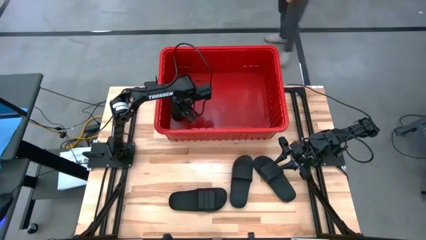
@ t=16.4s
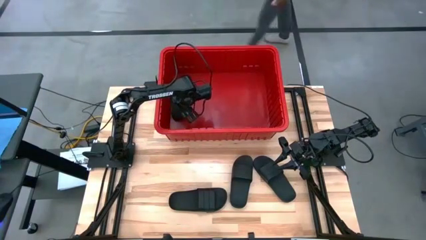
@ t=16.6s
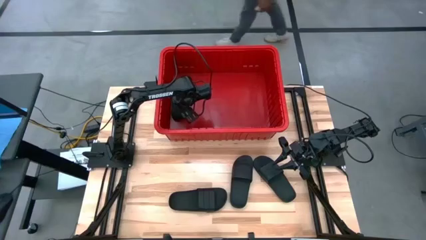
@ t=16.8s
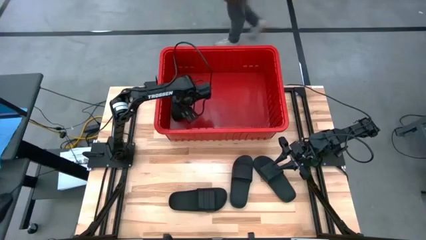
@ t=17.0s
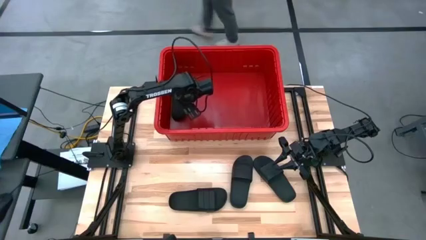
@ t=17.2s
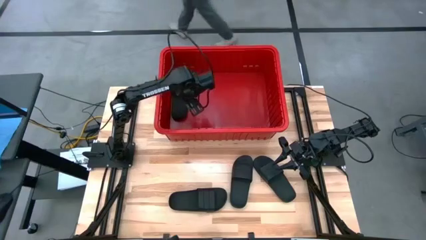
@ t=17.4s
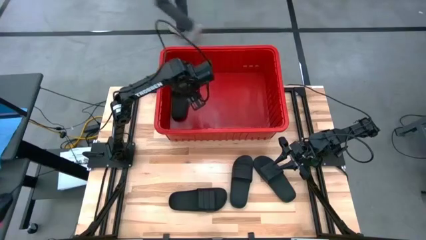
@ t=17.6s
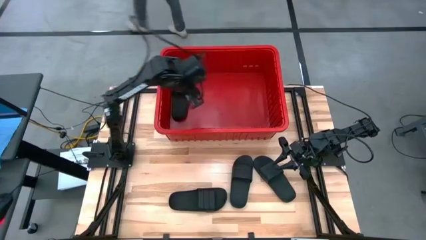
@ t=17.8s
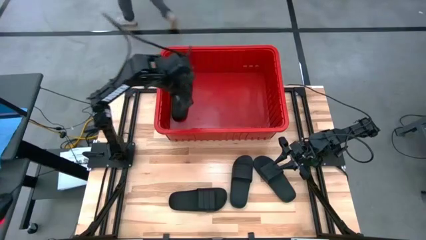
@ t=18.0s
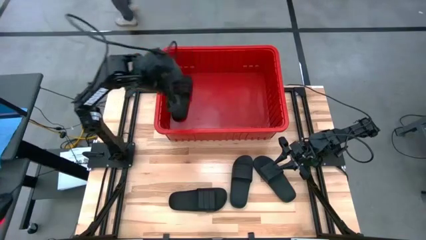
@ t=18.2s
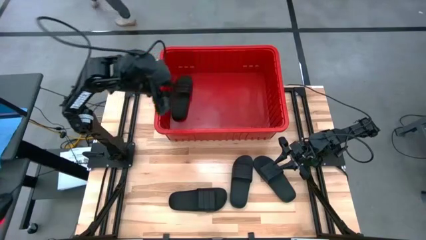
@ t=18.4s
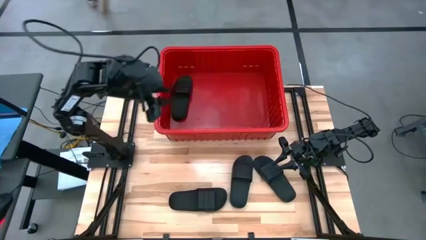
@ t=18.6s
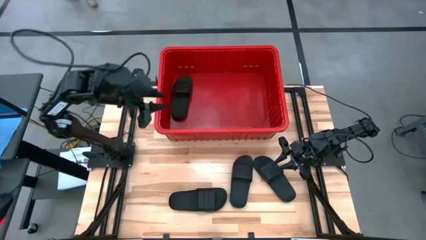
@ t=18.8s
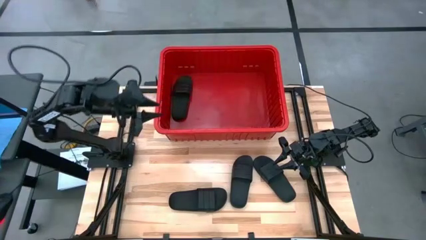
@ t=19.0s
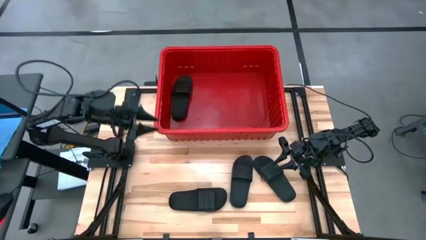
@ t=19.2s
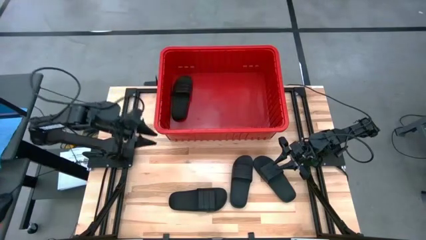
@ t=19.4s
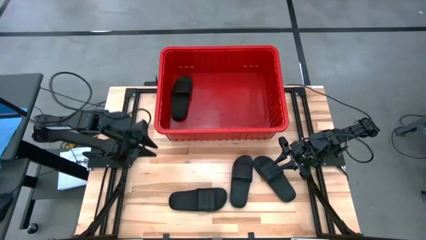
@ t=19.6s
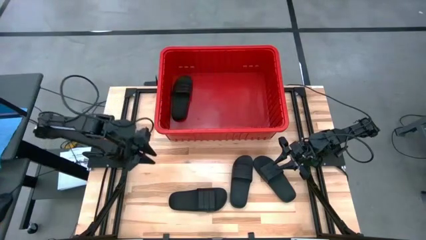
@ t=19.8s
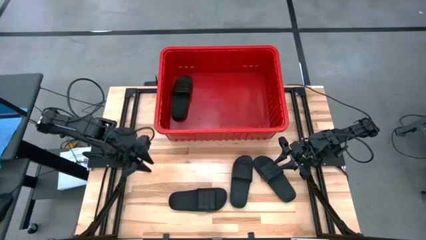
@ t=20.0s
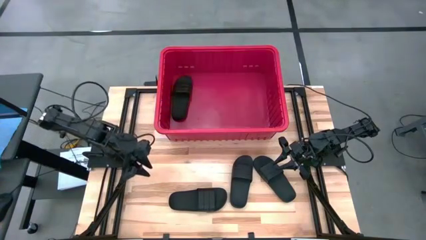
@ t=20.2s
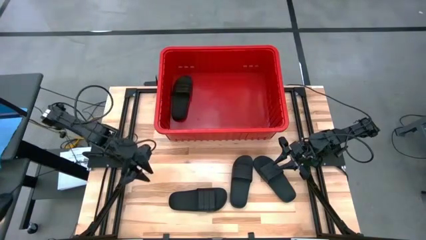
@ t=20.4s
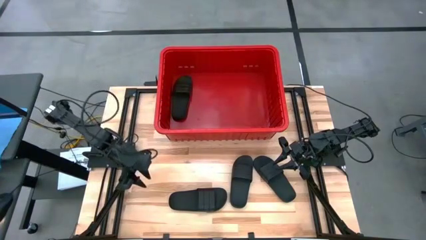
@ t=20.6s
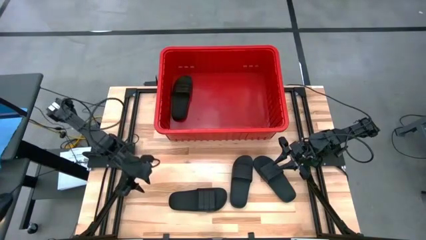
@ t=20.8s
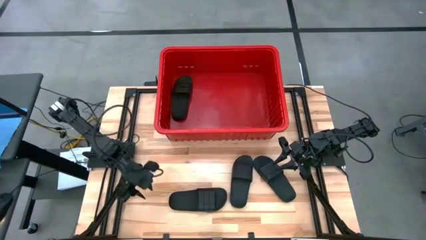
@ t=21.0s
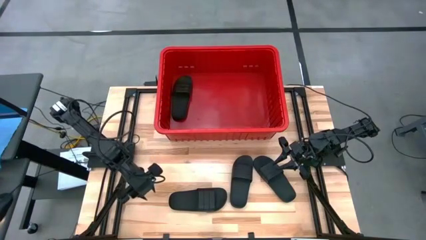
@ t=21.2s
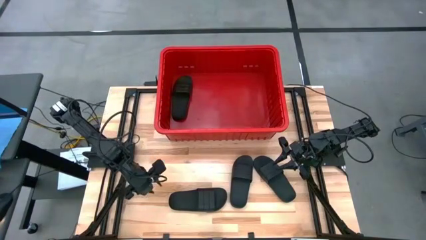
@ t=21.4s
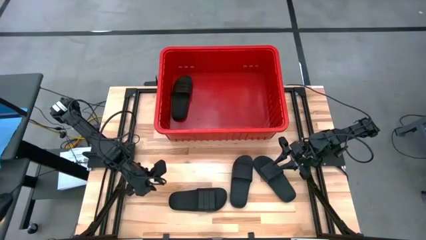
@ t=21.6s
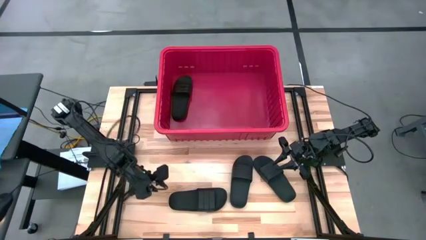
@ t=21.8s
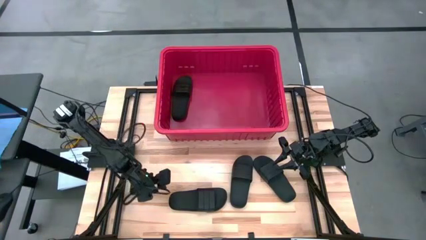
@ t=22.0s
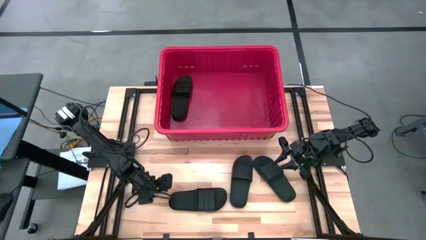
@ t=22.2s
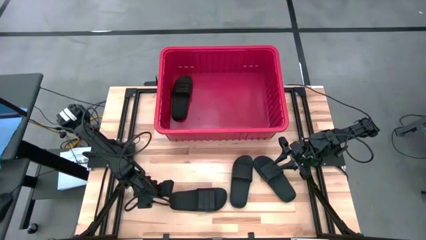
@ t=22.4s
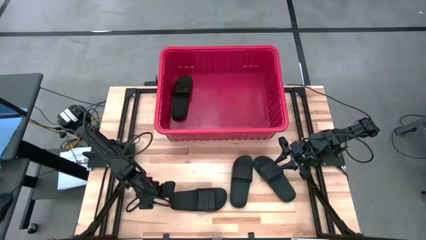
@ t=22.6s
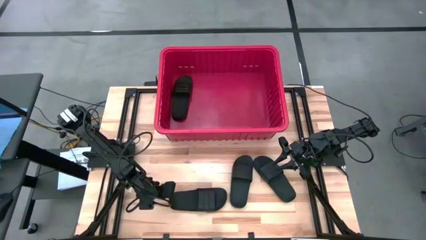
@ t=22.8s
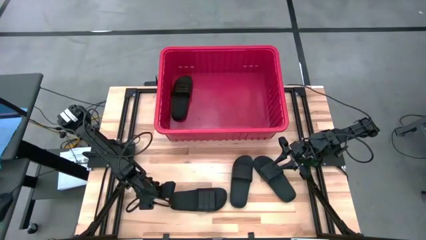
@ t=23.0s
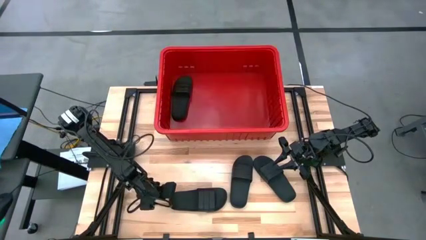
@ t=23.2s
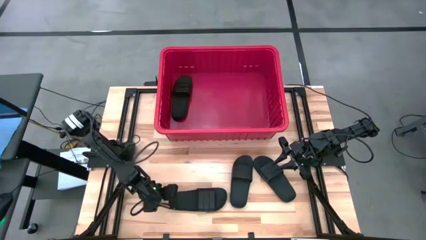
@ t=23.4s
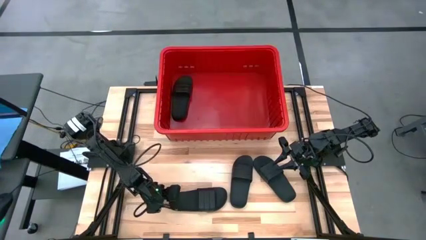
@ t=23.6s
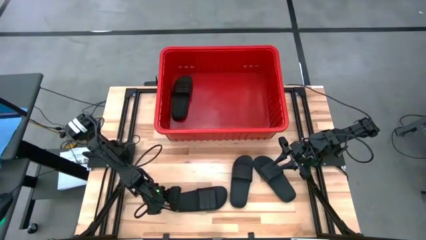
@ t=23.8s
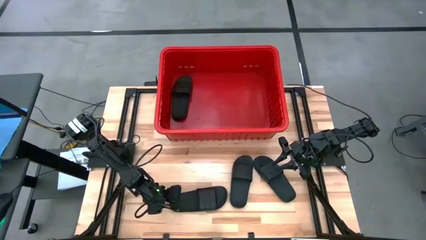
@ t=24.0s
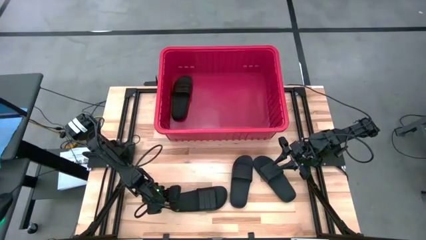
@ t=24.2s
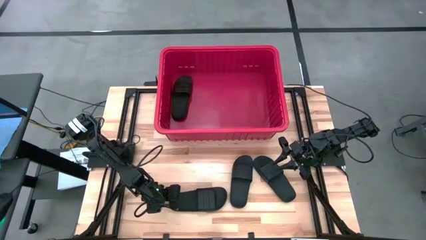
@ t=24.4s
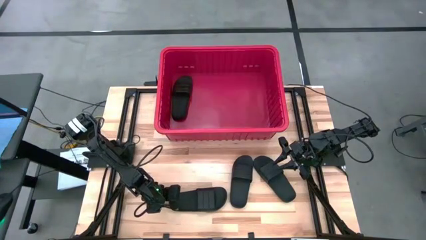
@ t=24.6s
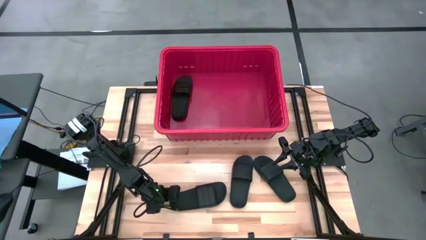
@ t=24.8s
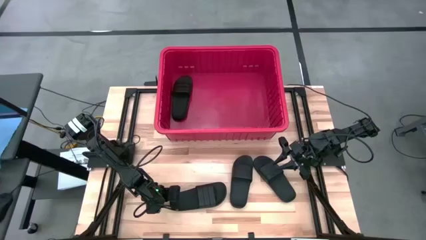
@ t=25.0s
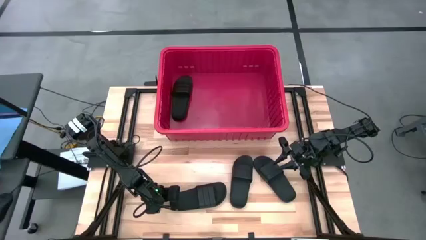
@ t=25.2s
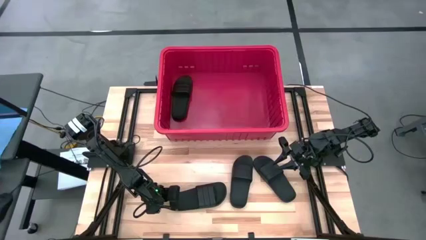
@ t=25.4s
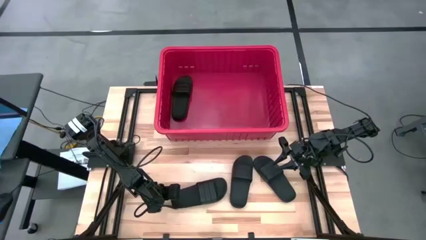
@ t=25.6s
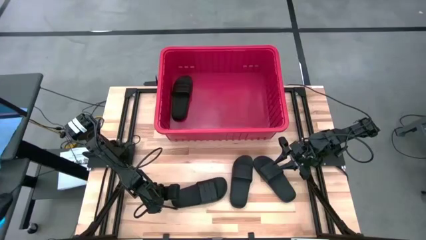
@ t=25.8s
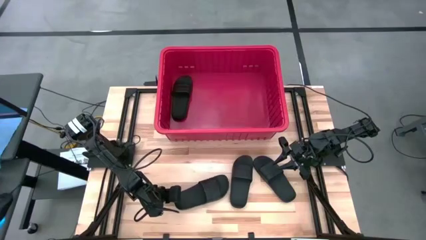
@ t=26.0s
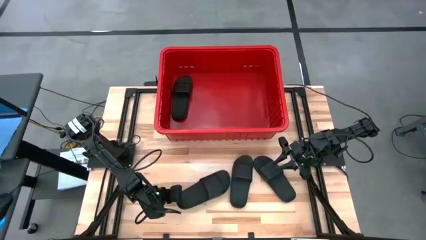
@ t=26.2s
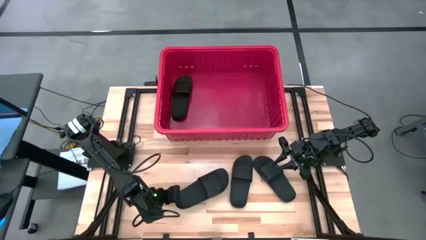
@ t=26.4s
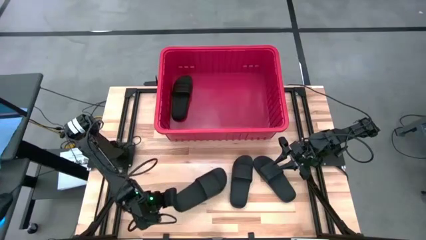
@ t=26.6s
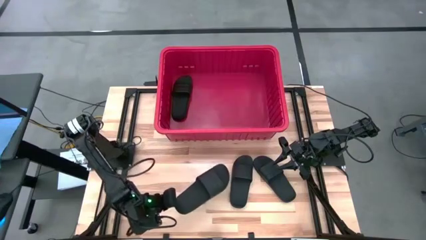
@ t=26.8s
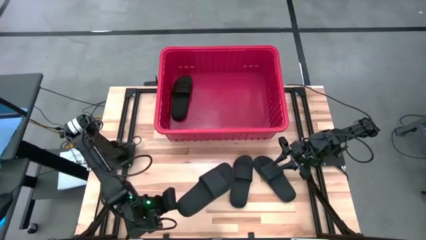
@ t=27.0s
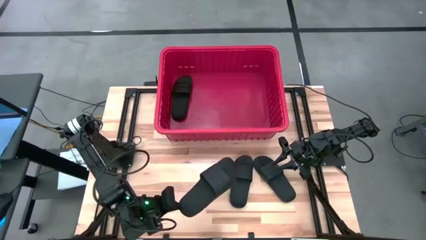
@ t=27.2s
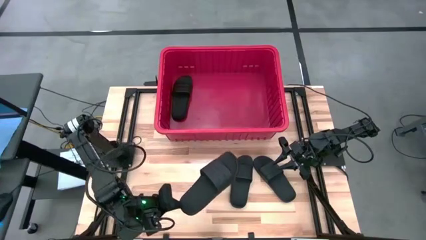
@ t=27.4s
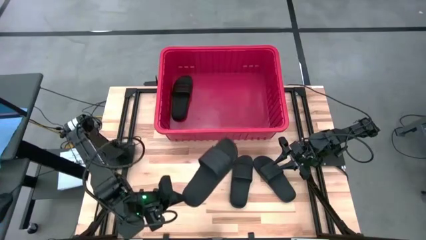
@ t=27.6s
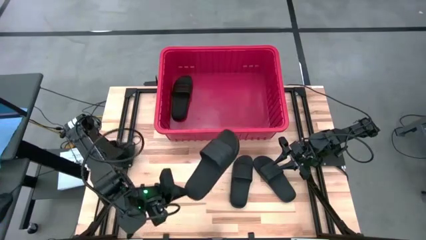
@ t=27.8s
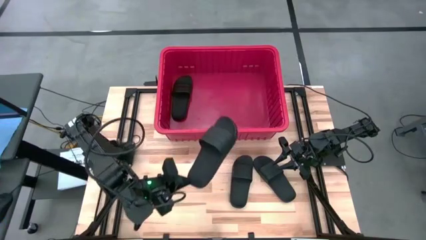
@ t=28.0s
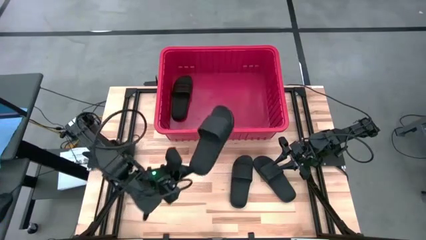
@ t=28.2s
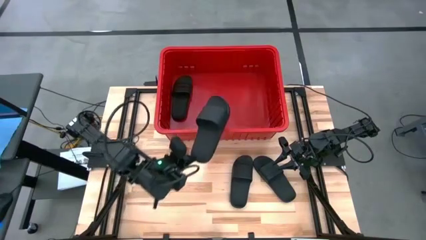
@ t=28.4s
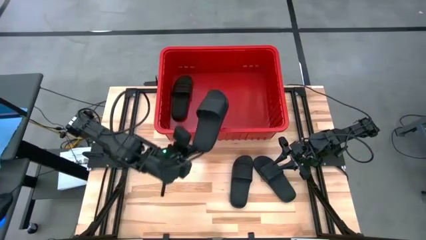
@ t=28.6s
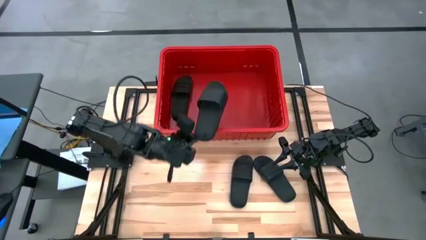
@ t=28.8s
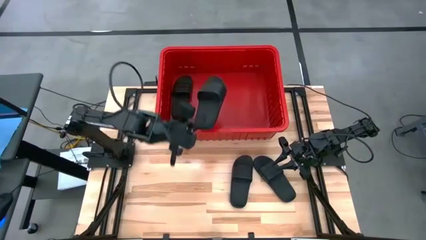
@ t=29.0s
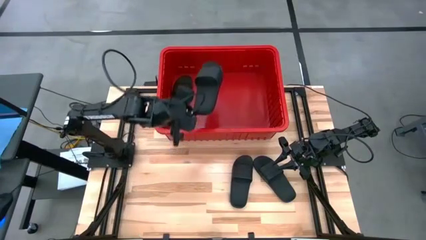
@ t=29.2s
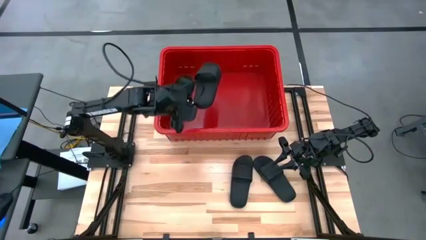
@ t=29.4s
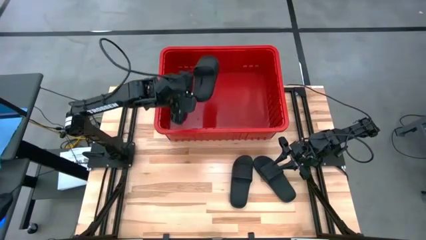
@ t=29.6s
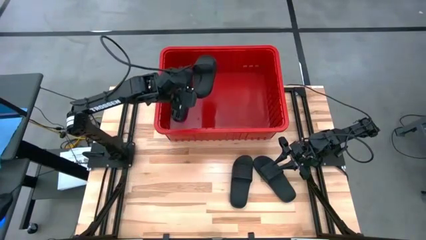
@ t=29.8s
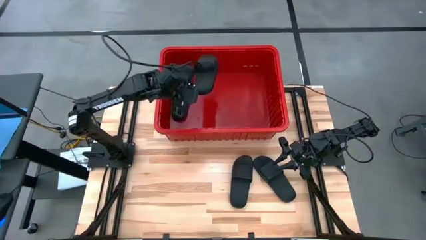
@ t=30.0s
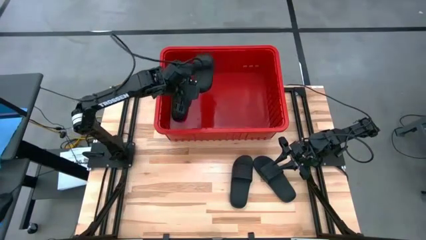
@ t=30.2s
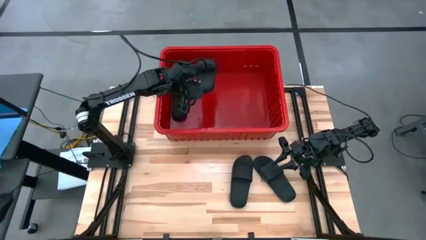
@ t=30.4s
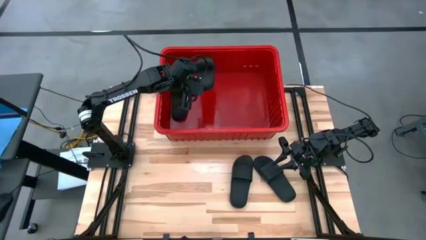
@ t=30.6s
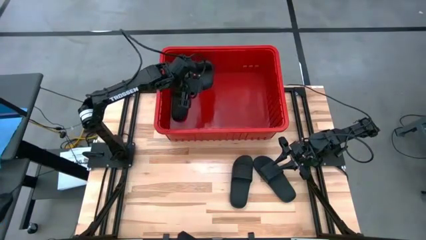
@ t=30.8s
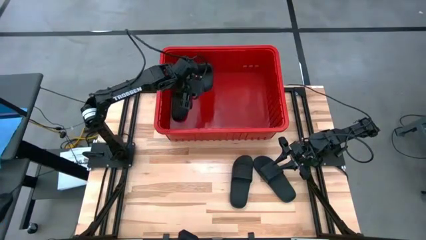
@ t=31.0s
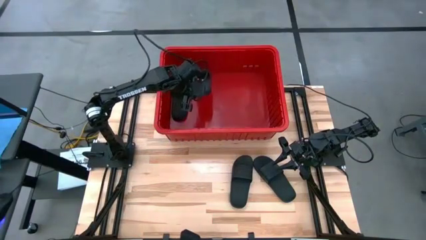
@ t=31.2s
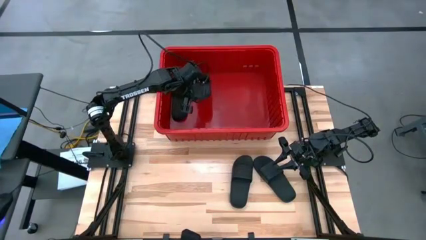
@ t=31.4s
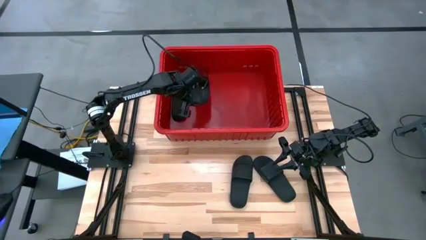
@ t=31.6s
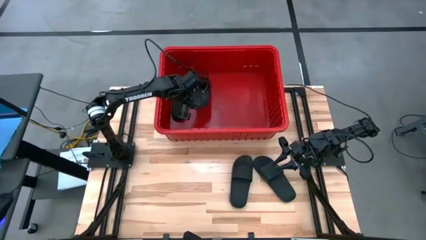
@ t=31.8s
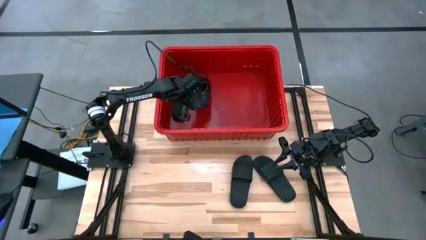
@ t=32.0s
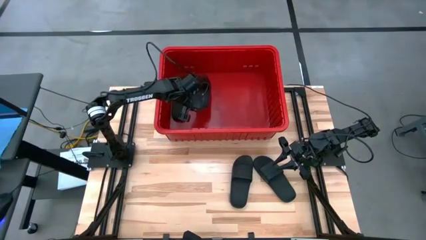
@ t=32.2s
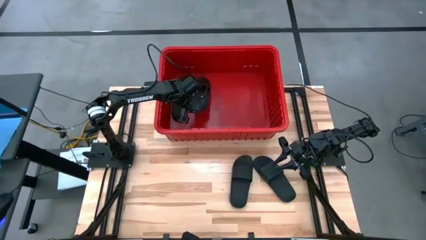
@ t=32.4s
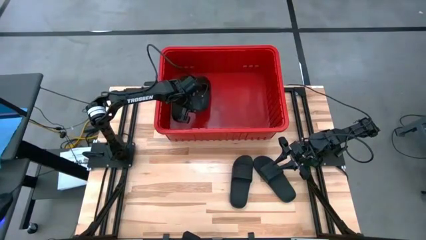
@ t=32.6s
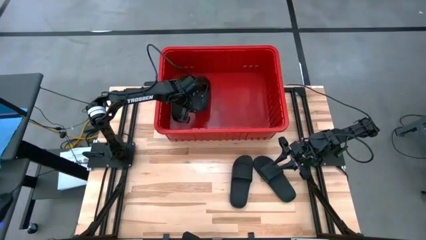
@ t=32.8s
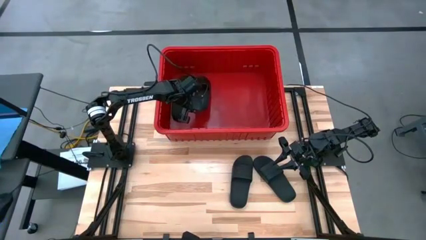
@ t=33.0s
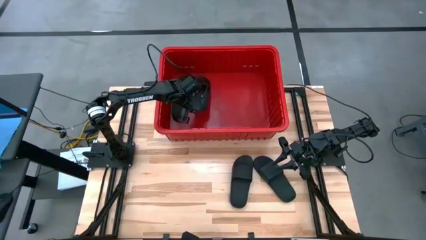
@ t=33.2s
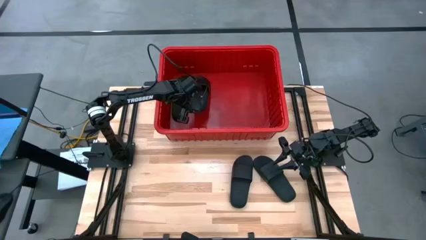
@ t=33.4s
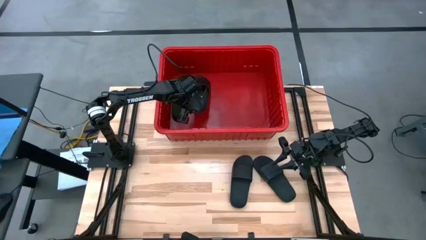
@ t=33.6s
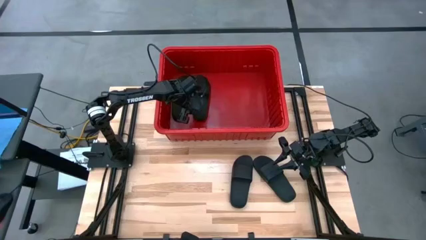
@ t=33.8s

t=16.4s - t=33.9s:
Task: Pick and place slides into bin
Put the black slide into the red container
